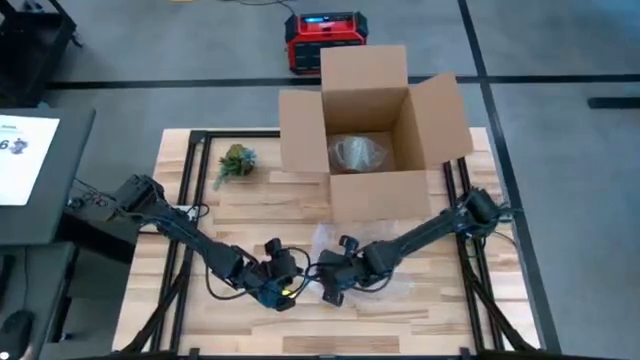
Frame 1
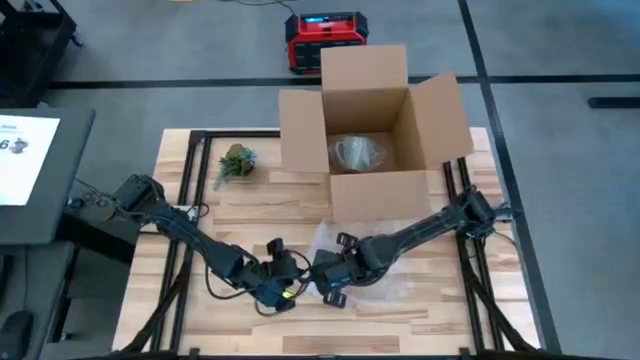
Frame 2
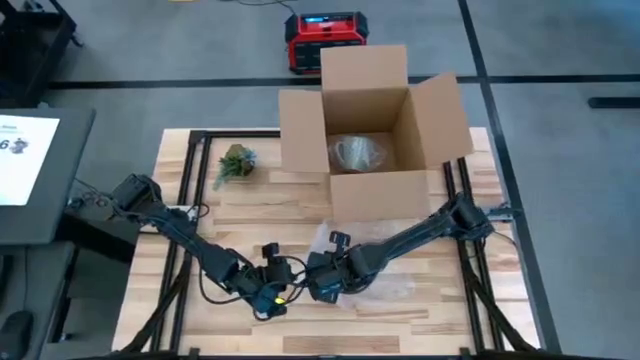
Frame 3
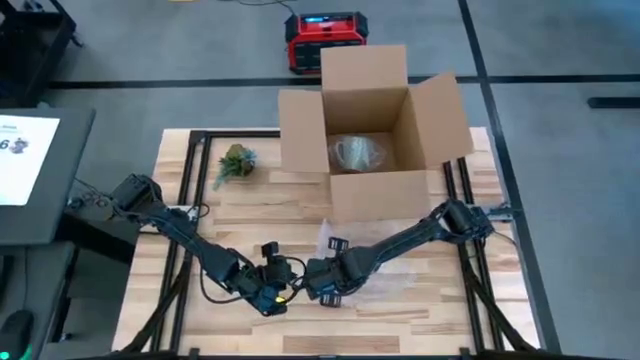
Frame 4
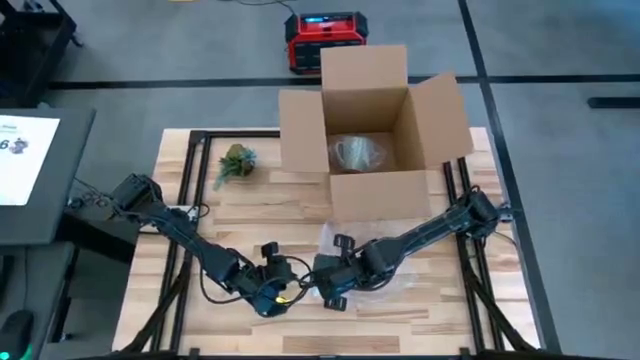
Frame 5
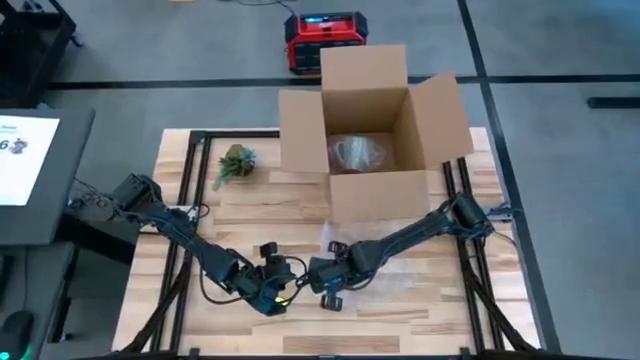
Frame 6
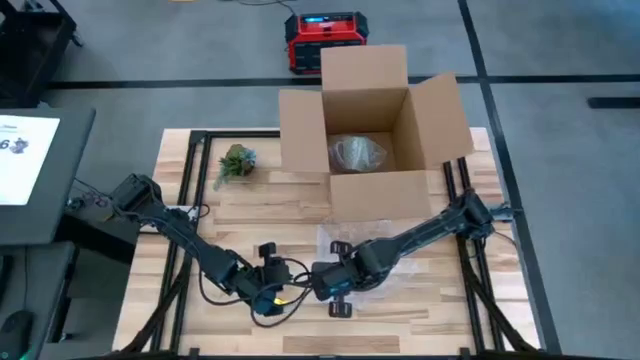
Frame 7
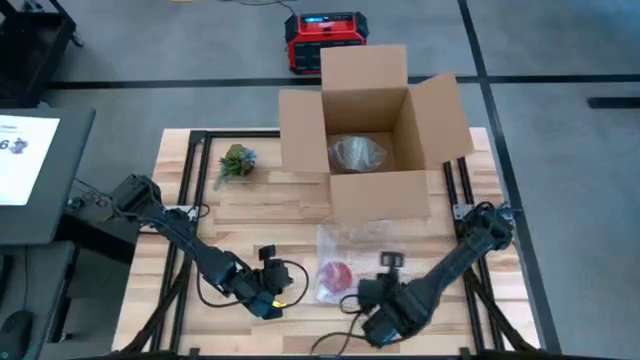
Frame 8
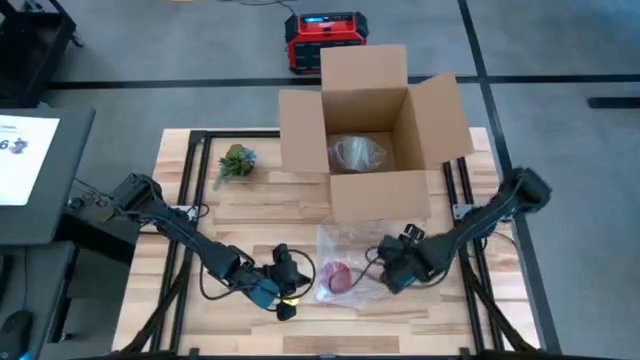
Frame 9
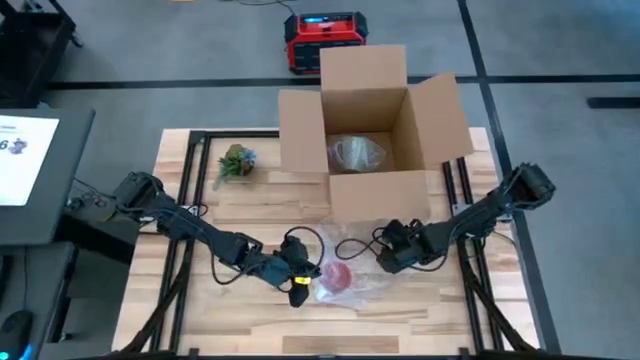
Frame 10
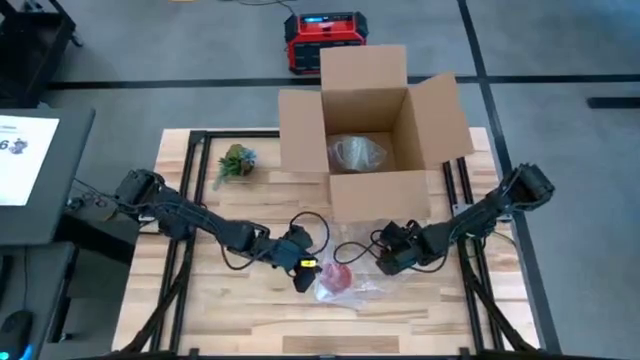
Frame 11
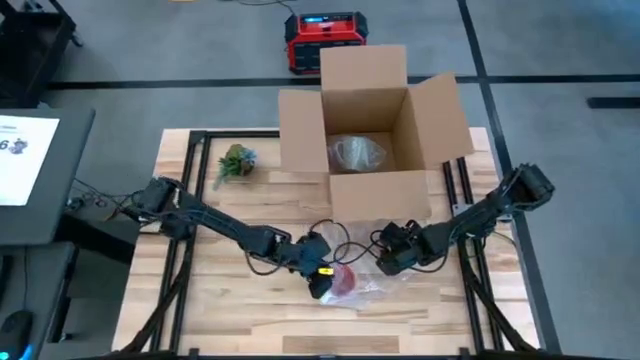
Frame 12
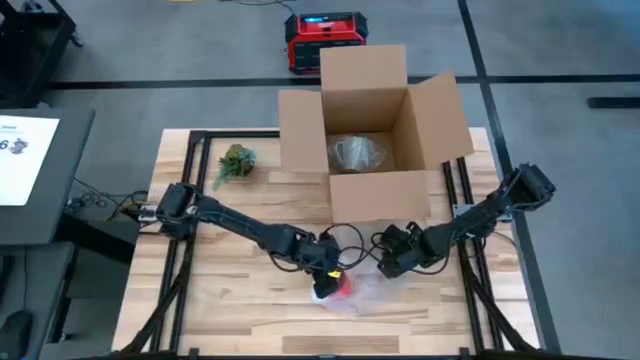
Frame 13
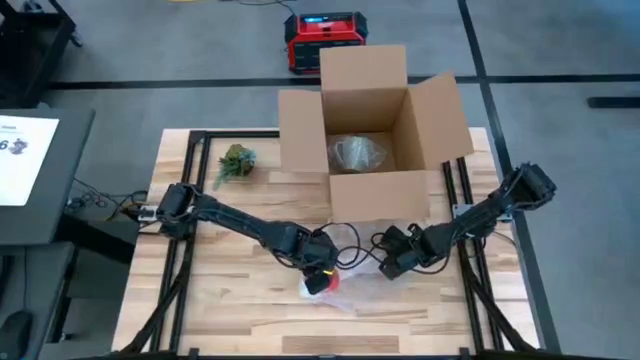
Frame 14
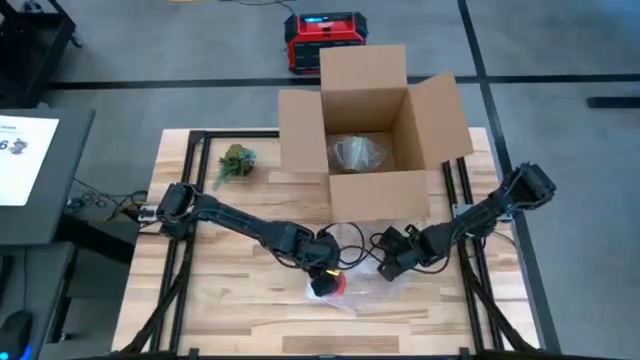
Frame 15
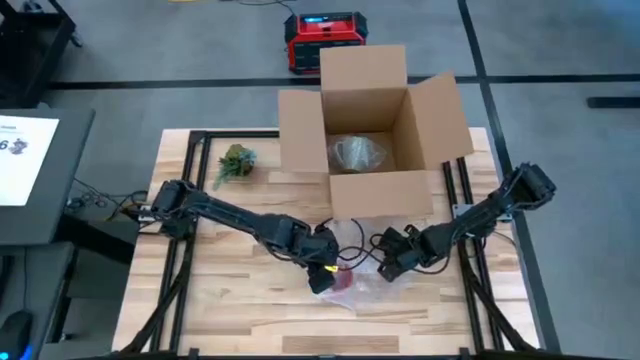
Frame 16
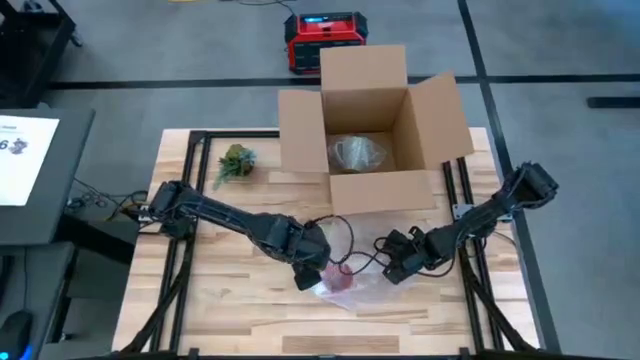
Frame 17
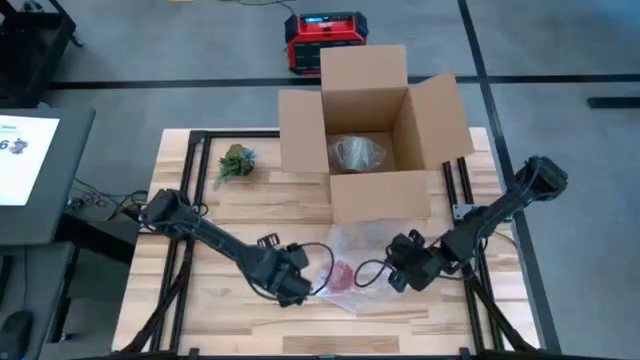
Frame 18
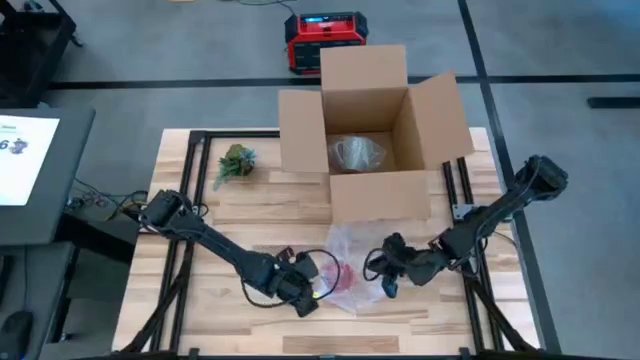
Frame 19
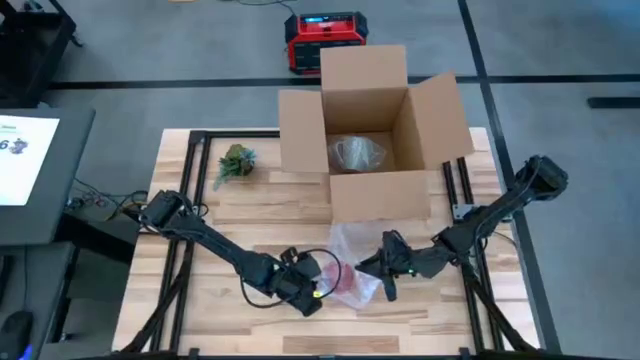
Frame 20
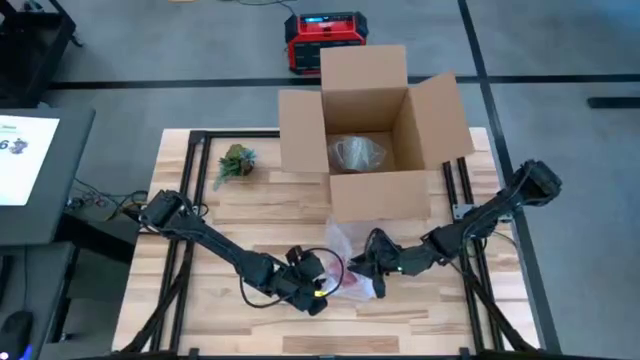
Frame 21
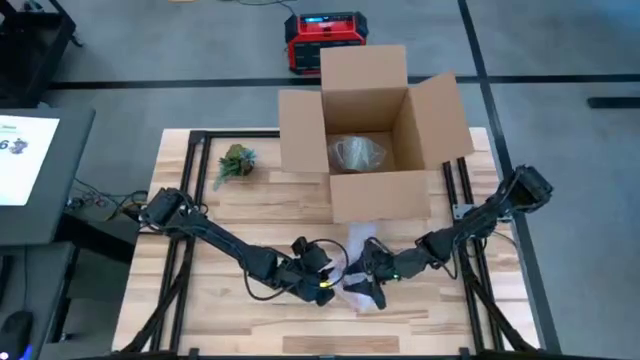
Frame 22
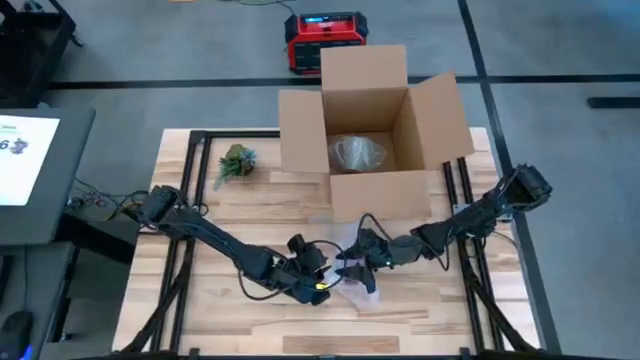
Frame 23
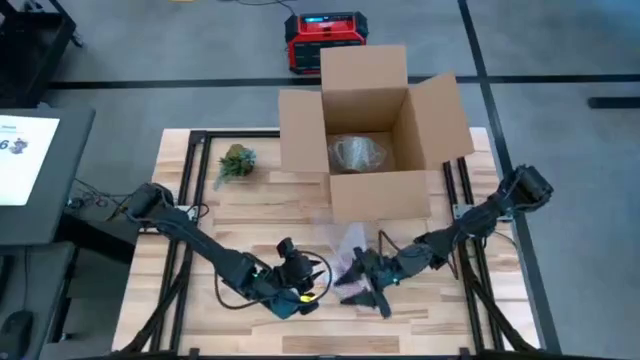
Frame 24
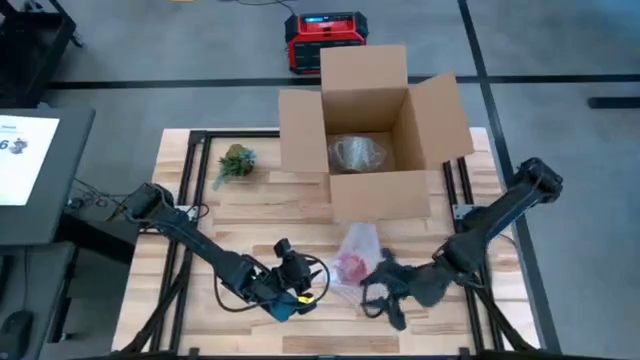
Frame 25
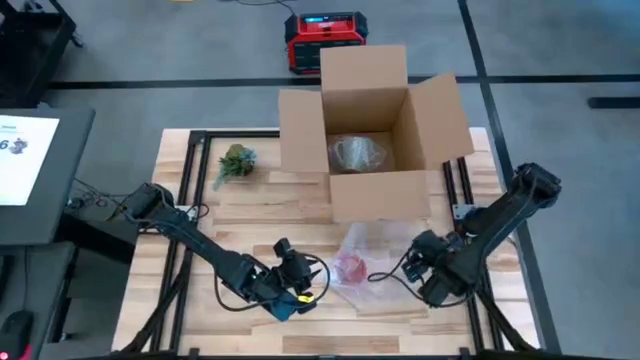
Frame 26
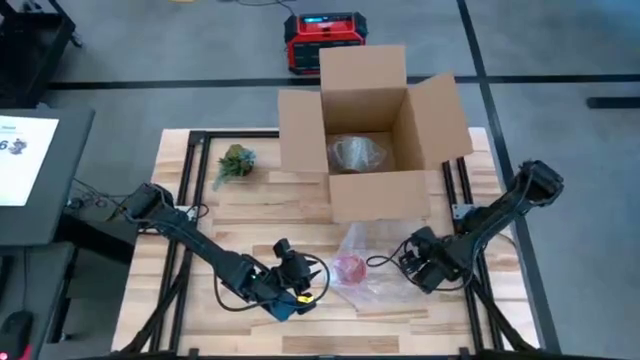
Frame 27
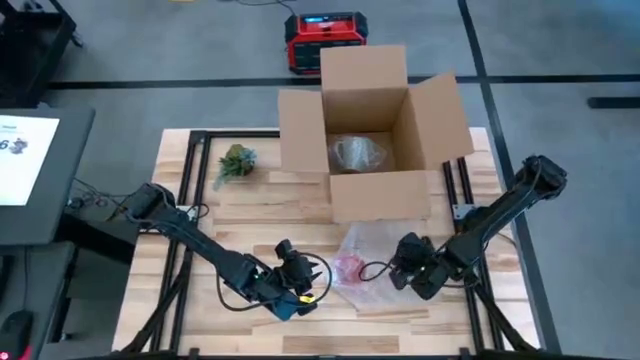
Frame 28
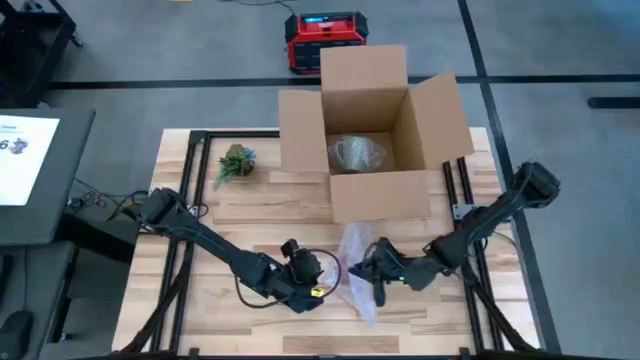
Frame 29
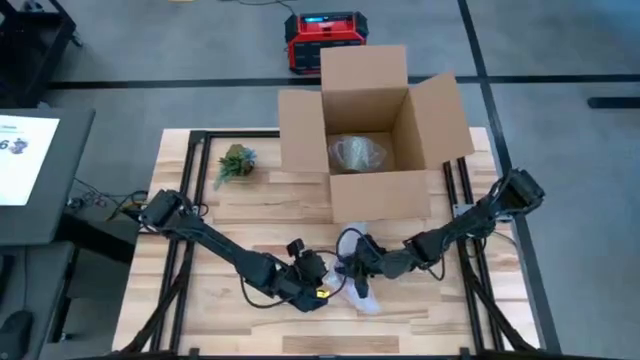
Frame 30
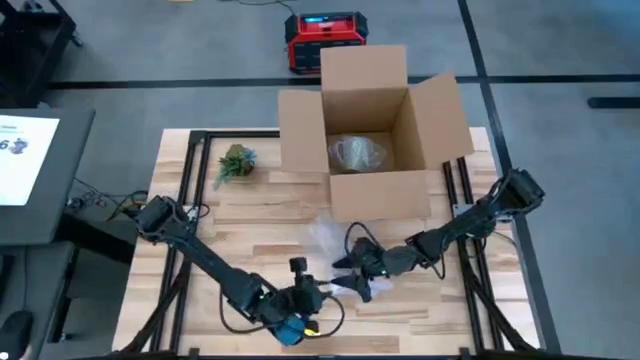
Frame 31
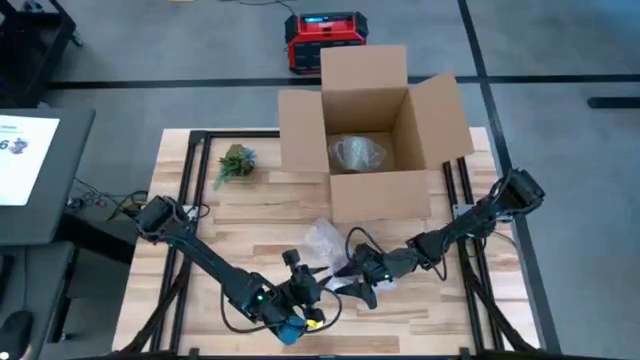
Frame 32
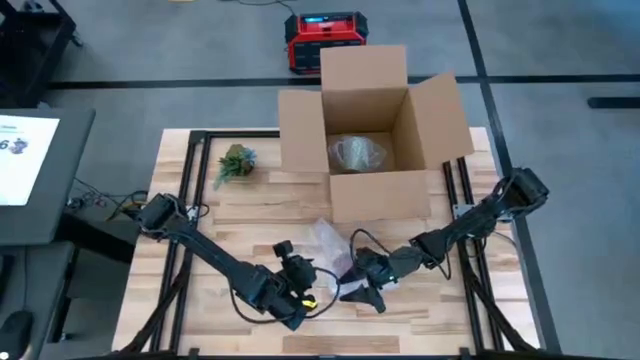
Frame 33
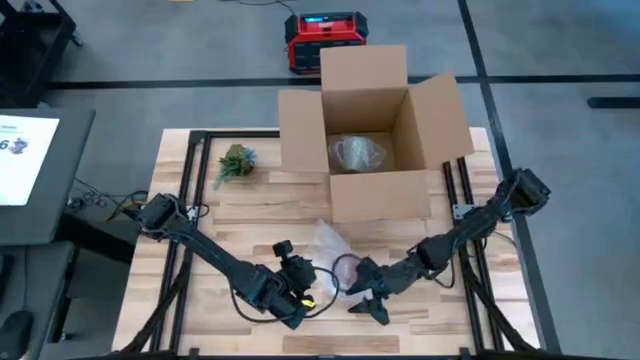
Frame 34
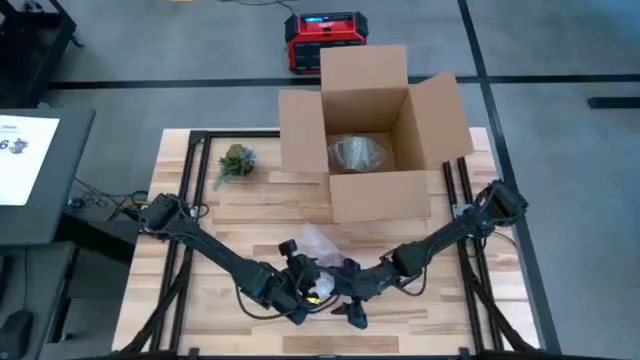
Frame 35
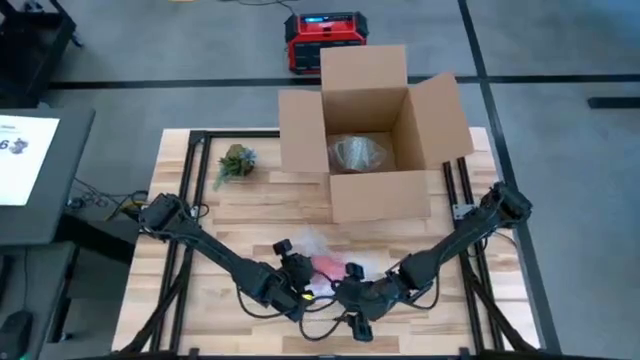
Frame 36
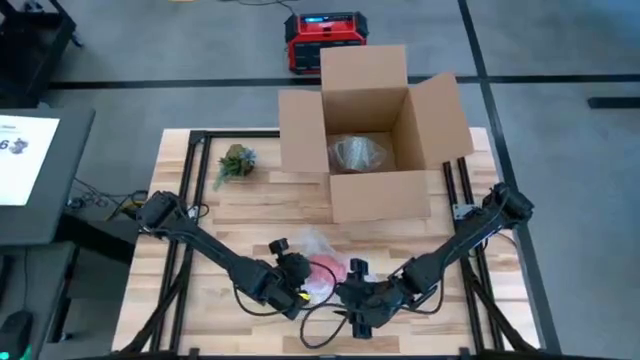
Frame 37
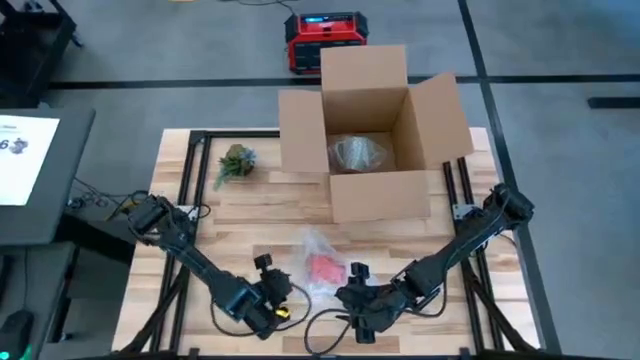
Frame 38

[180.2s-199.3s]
Task: wrap mug
Wrap the red mug with the transparent bubble wrap

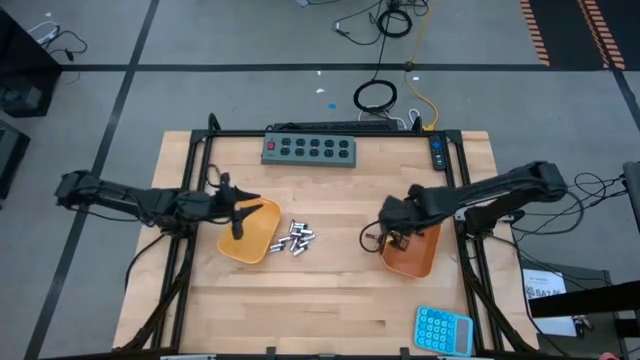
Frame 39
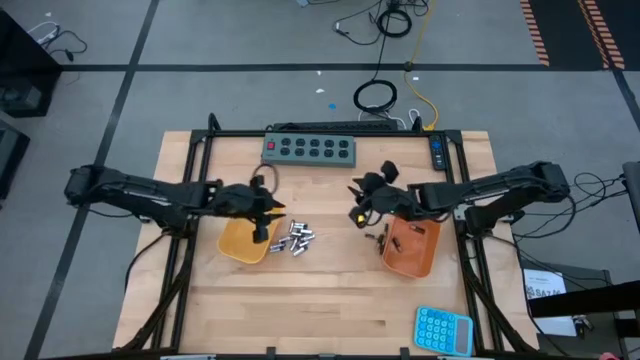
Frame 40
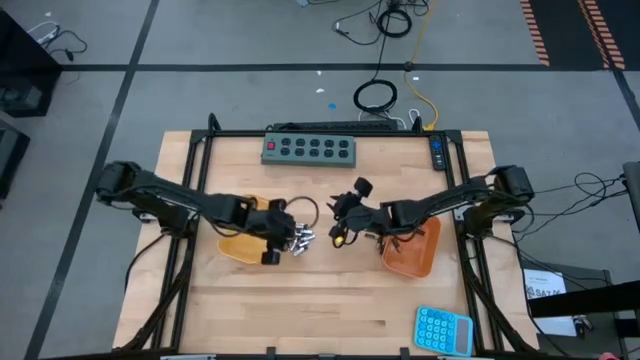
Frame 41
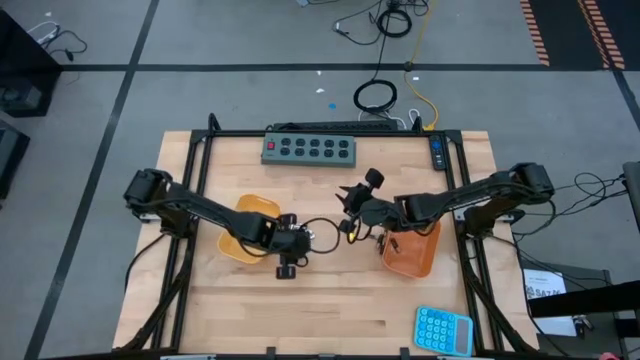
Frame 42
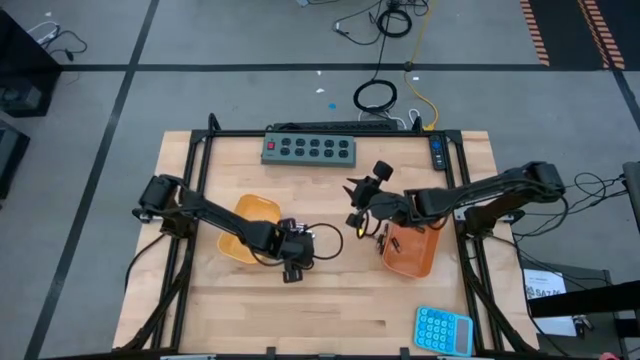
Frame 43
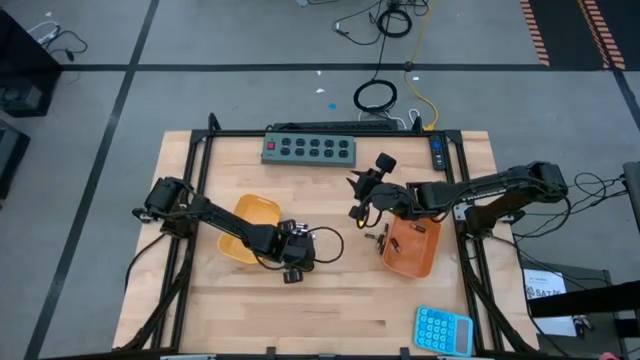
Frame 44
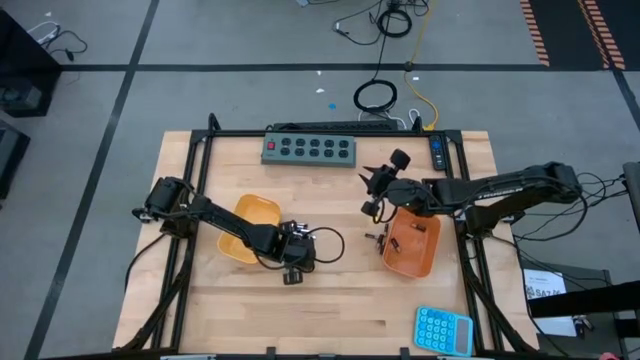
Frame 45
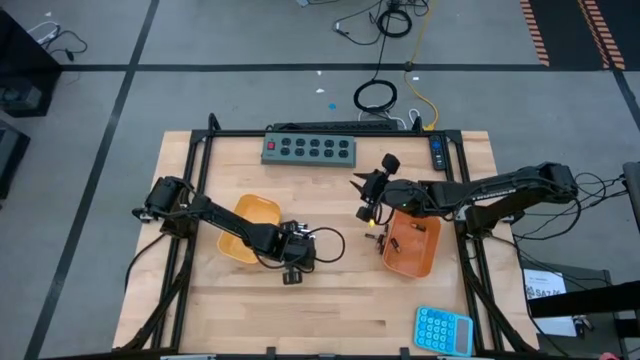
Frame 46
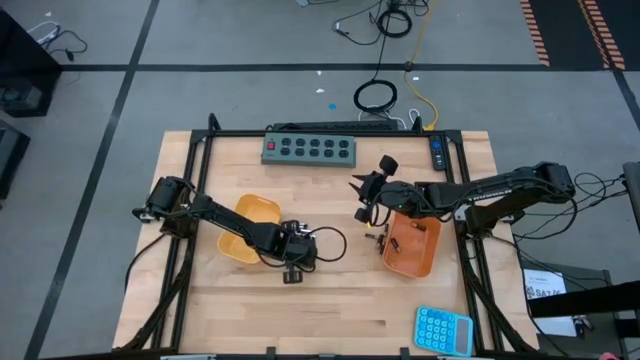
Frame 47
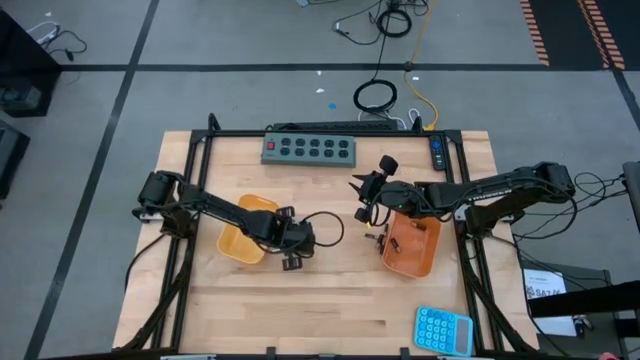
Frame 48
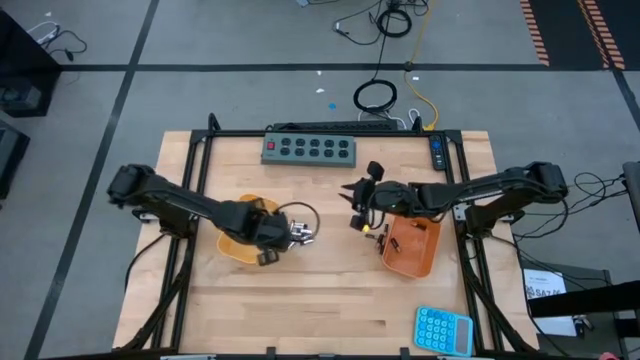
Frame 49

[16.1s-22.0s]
Task: Sort batteries
Put the silver battery into the yellow bin
